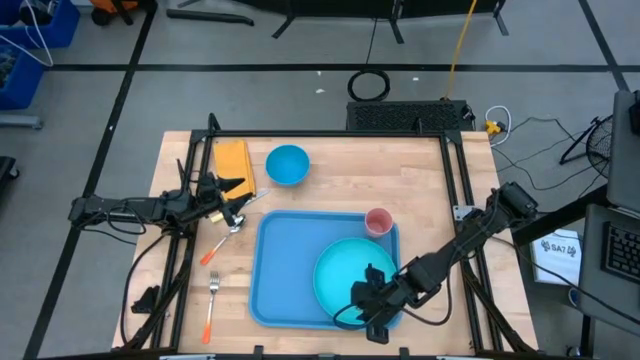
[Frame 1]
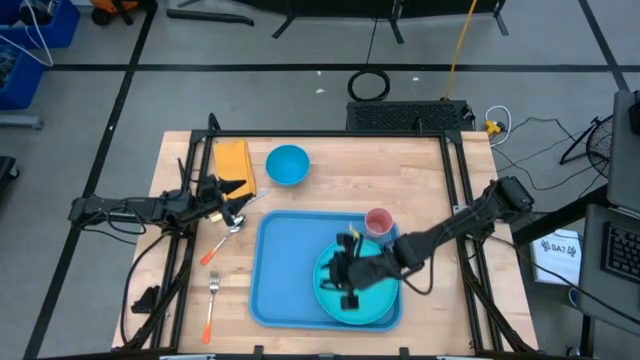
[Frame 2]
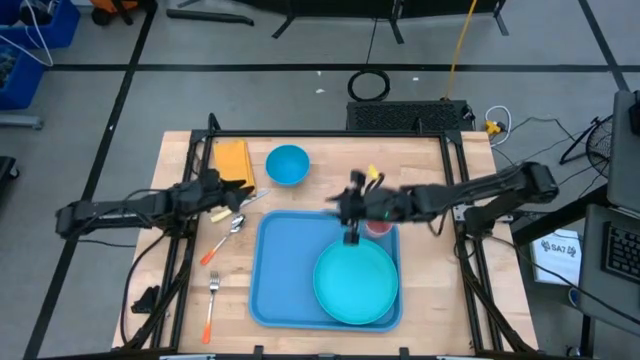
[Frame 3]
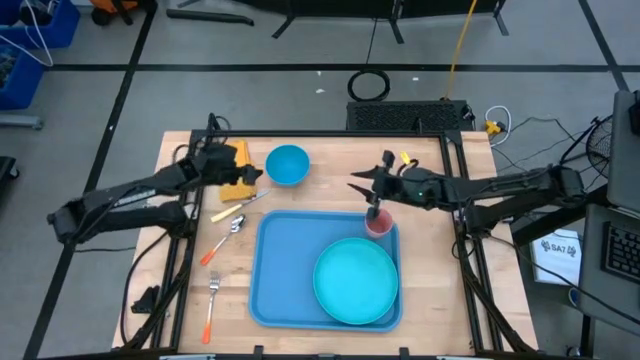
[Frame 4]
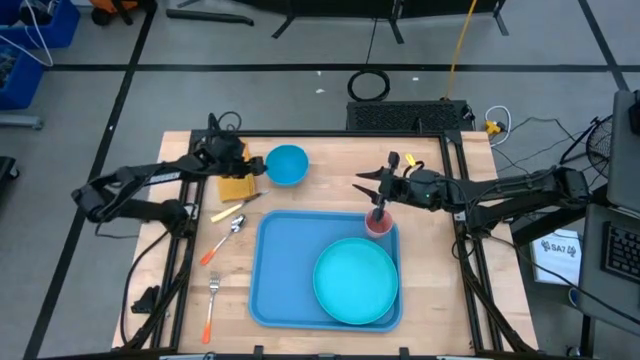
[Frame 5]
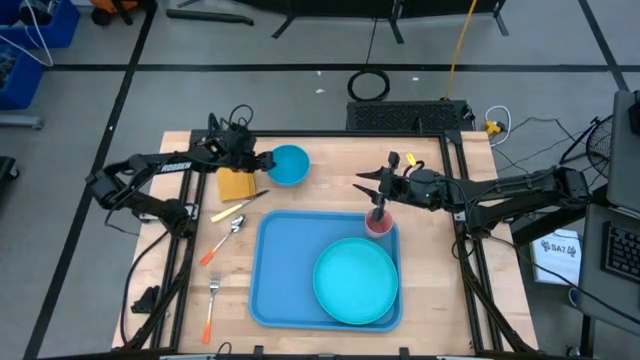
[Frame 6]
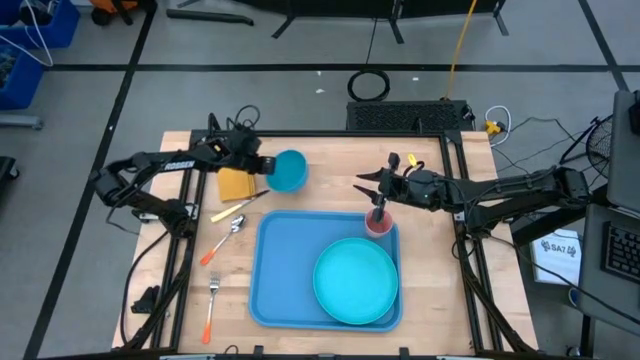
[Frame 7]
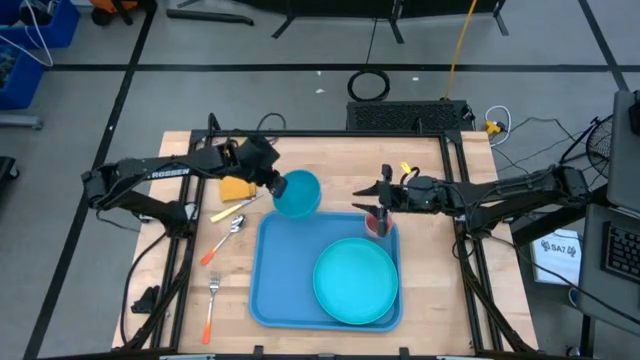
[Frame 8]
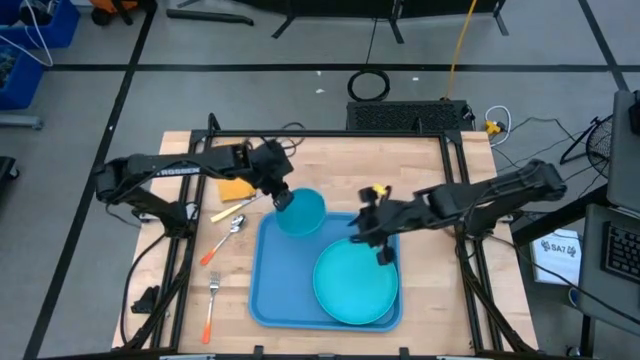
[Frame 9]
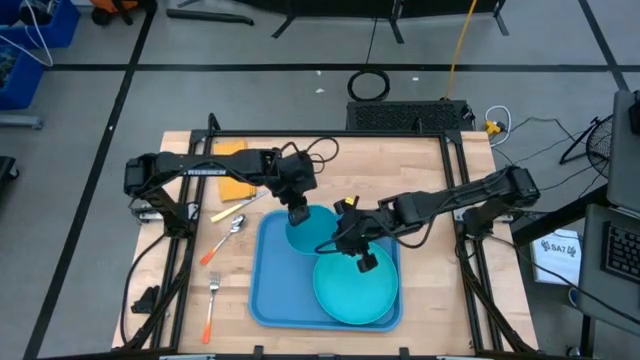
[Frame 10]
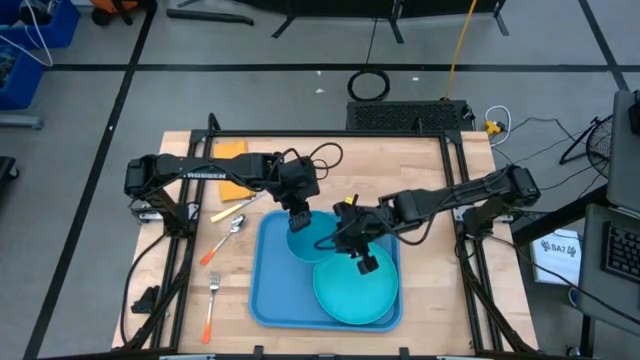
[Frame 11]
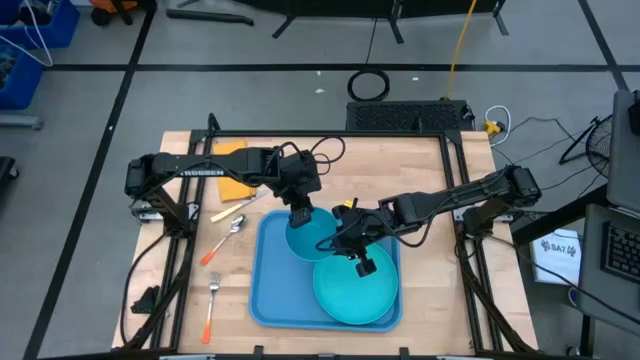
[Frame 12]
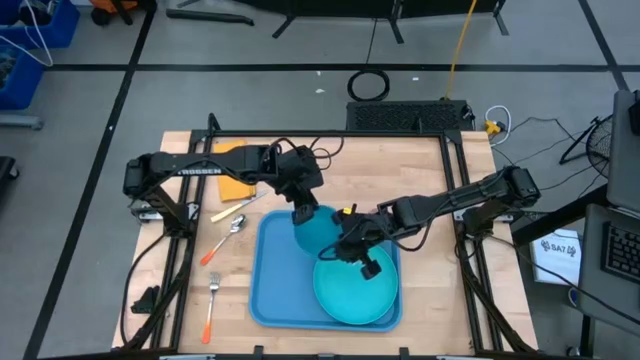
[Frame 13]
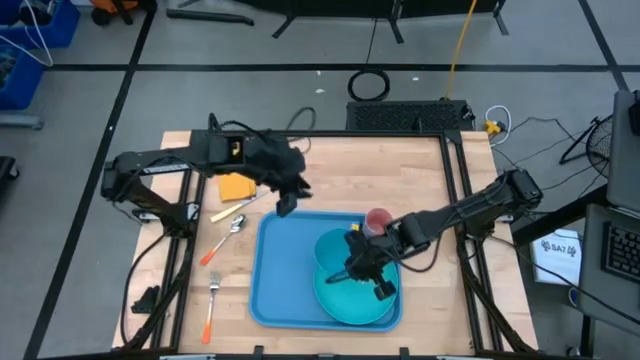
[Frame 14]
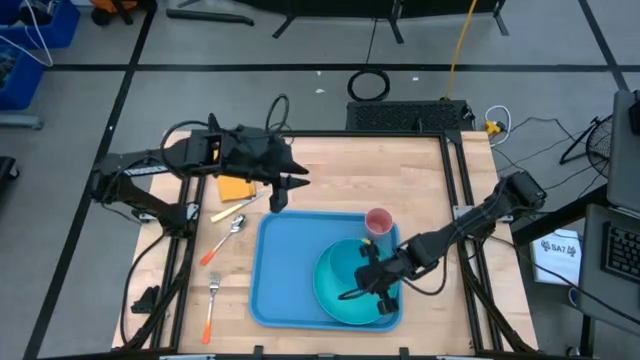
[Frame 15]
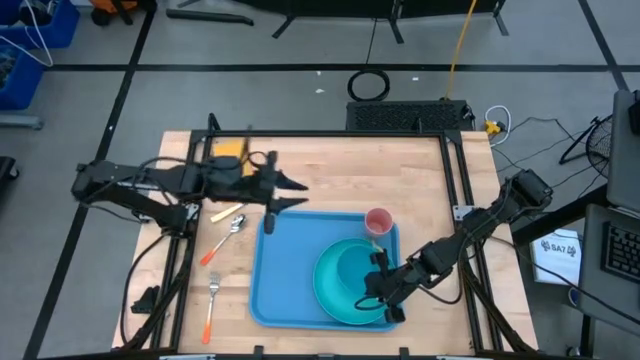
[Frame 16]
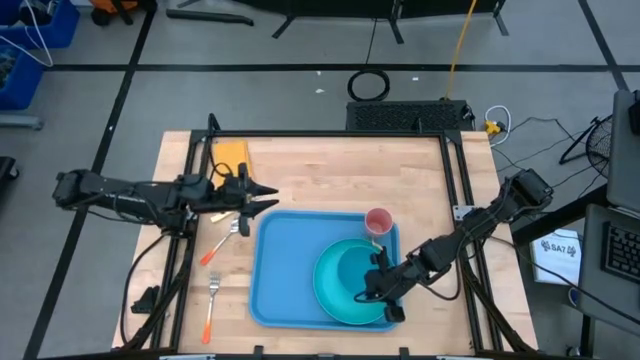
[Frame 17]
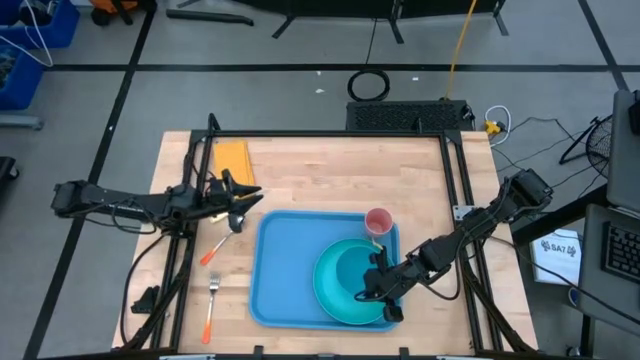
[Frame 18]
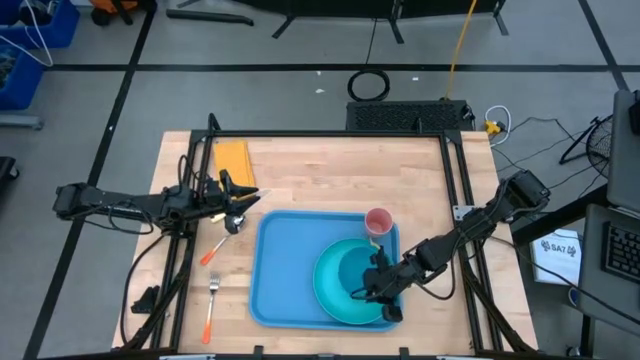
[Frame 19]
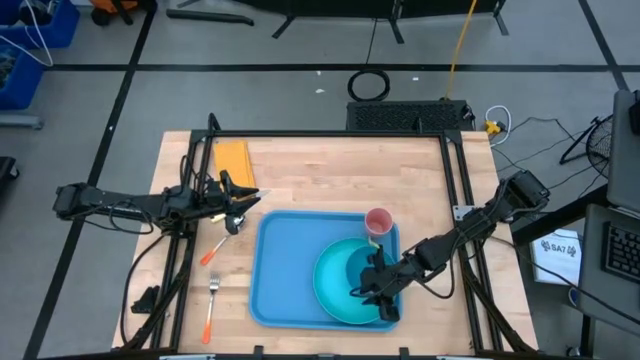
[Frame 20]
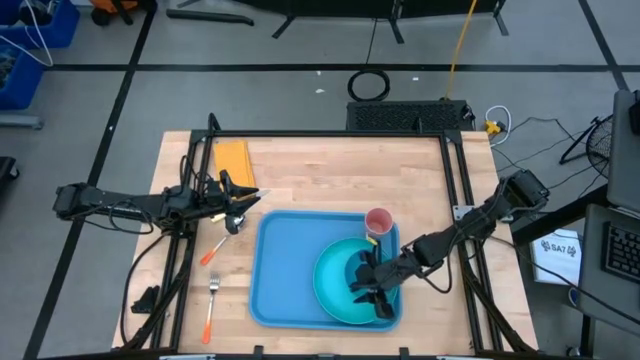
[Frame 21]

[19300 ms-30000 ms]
Task: Set up tray
Put the blue bowl on the green plate on the blue tray

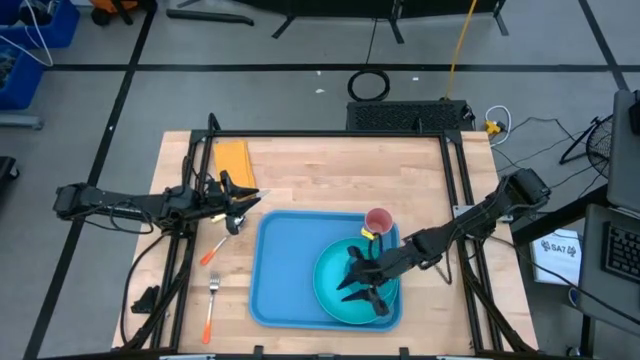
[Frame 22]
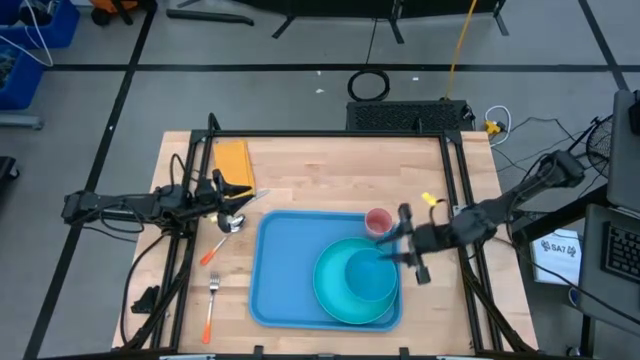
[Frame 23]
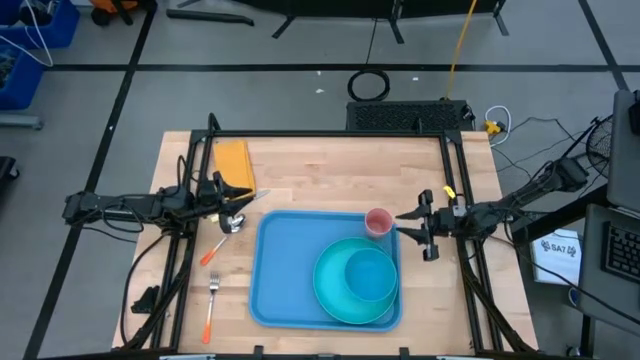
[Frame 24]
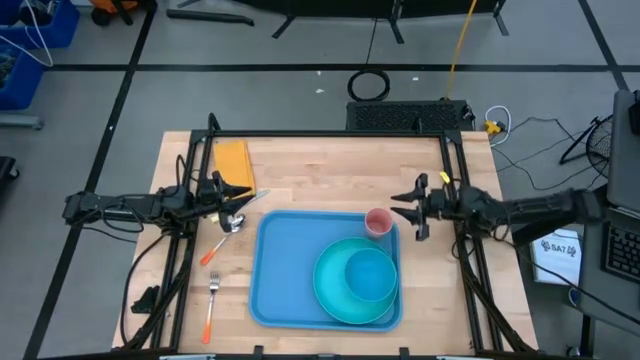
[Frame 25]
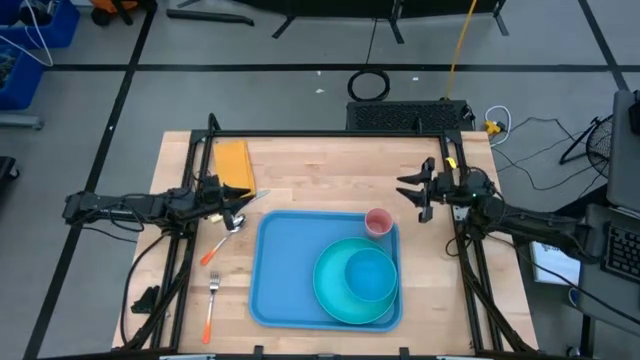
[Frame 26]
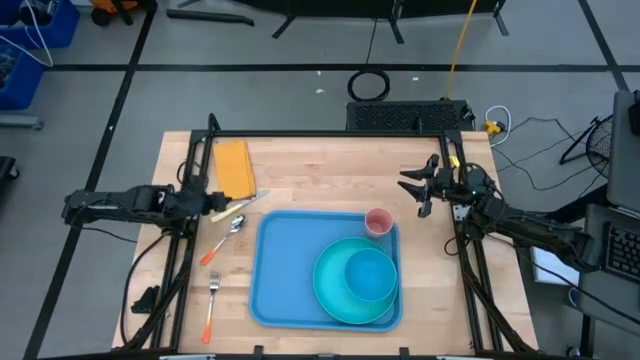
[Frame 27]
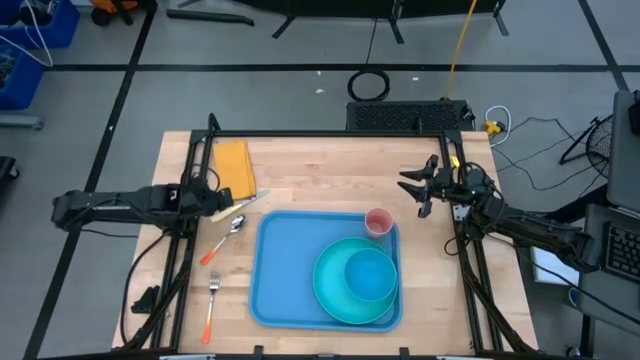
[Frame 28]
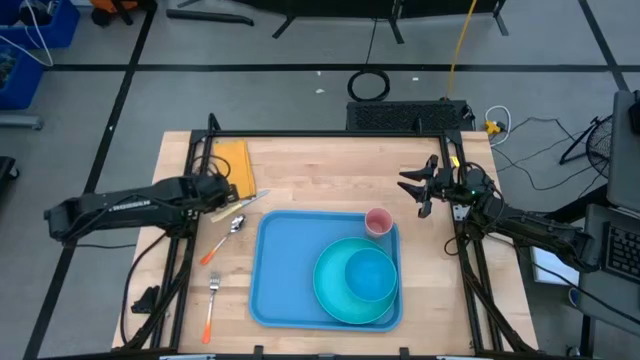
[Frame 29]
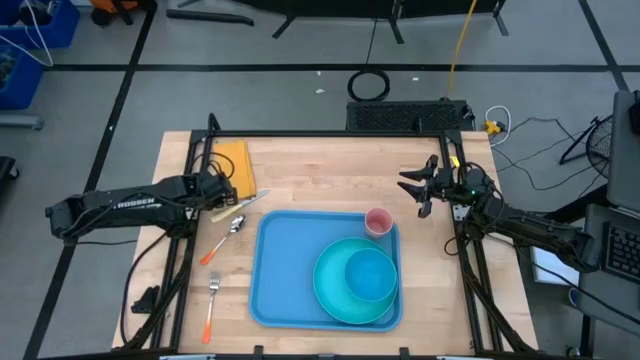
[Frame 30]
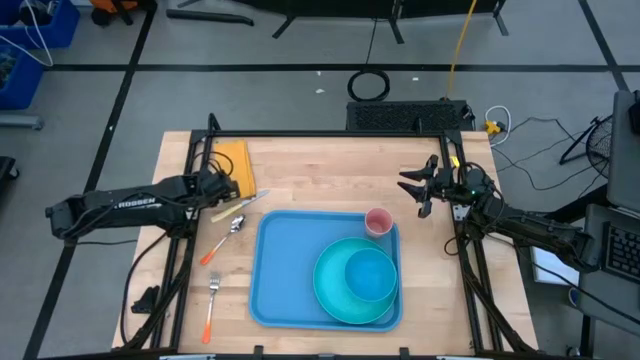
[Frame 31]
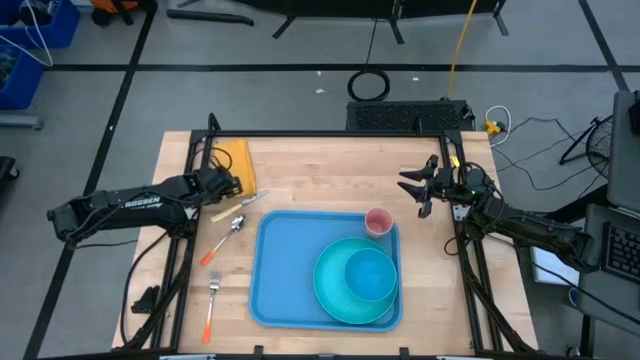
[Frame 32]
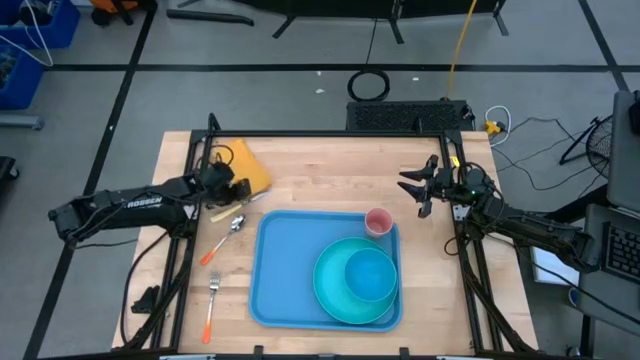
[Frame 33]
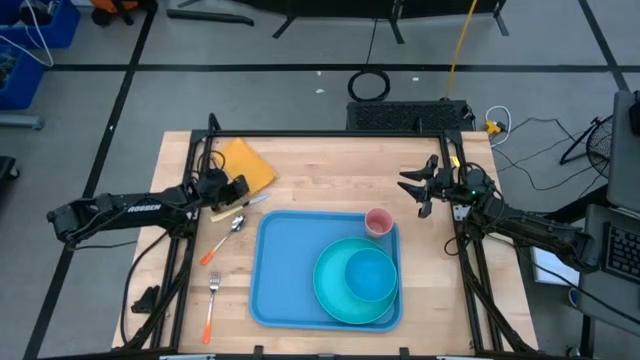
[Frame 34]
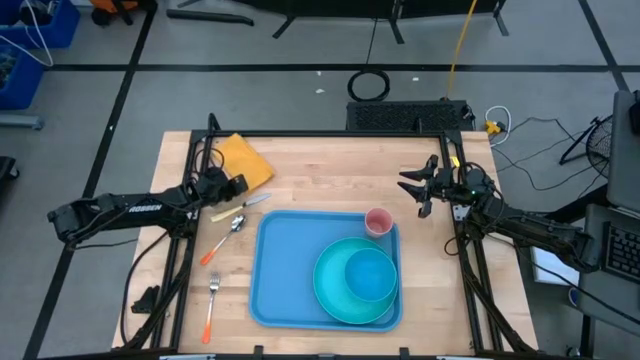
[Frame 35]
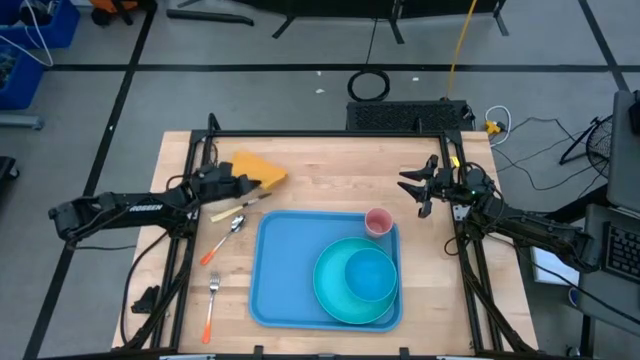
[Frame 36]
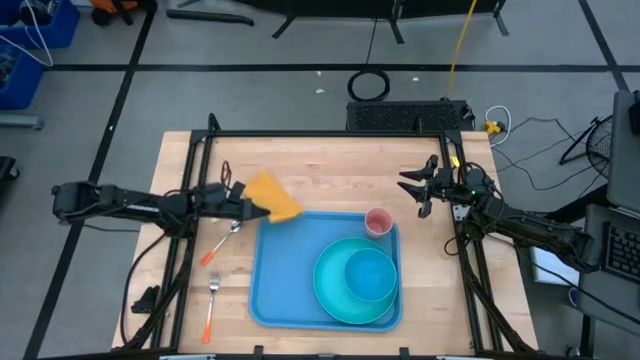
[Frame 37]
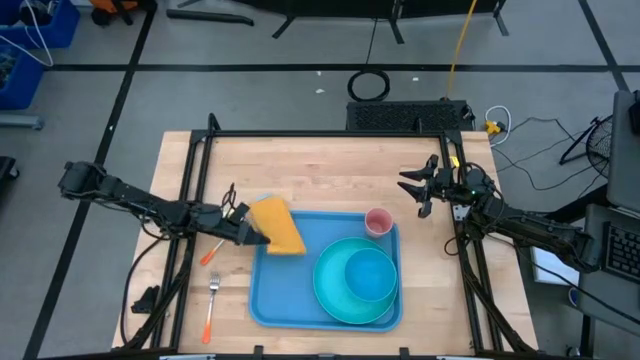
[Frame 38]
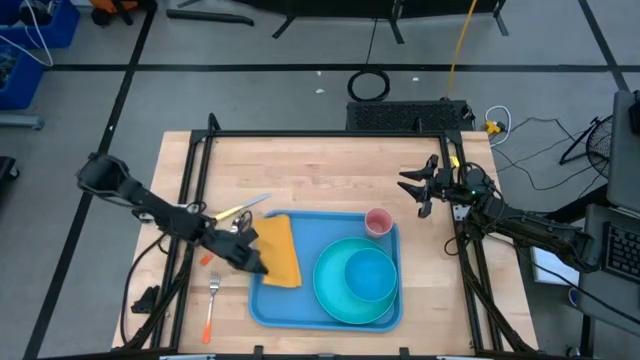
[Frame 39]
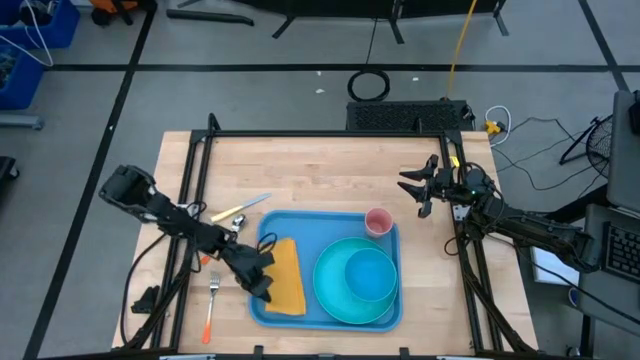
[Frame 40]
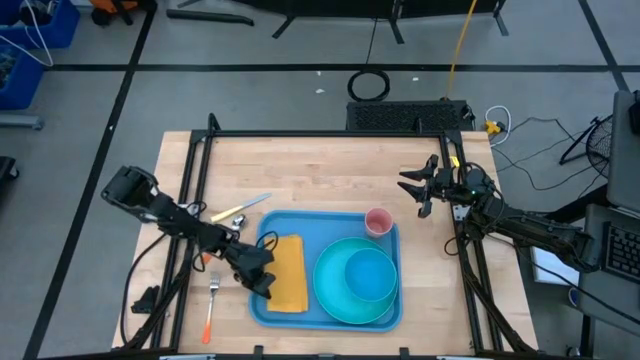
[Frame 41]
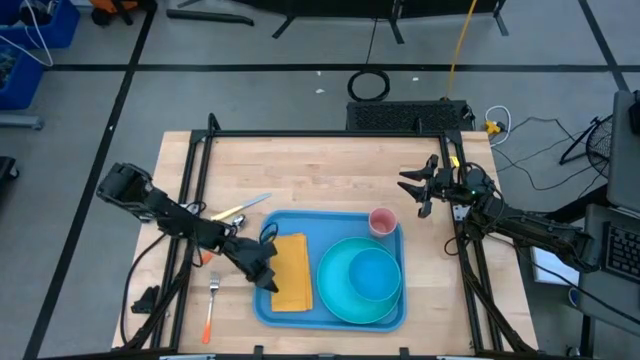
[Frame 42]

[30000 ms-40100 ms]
Put the yellow napkin on the blue serving tray to the left of the green plate

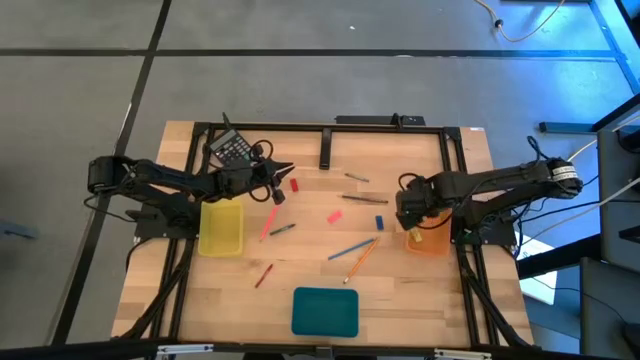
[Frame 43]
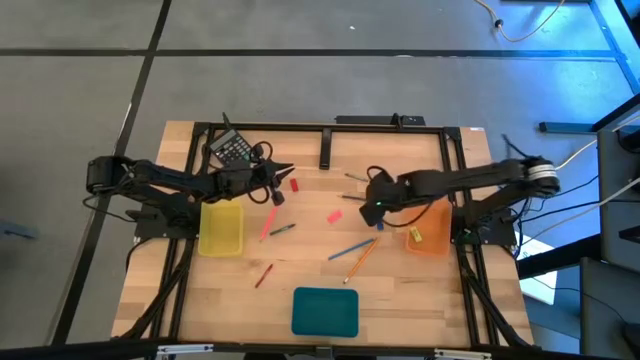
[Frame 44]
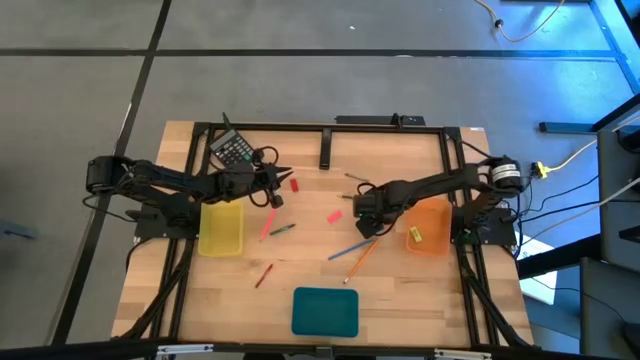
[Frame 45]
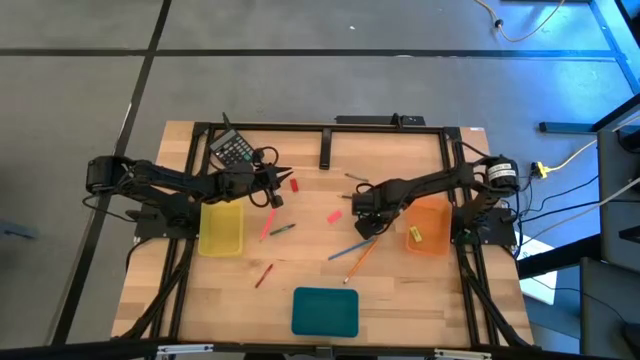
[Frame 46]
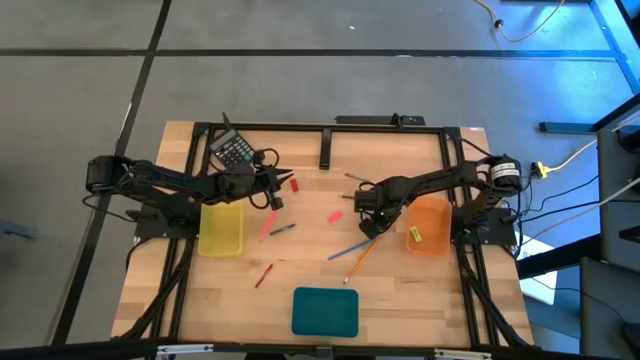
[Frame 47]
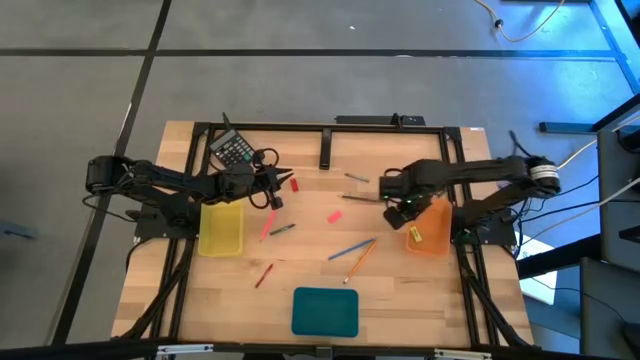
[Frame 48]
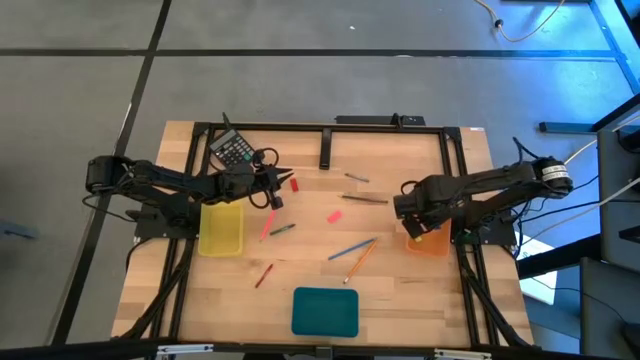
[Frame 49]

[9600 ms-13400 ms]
Task: Sort crayons/erasers/pens/pencils in bins
Put the blue eraser into the orange bin
